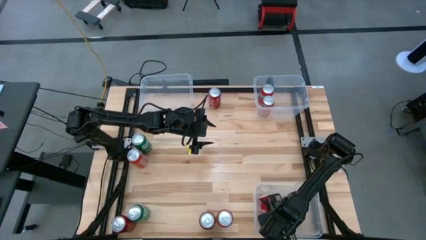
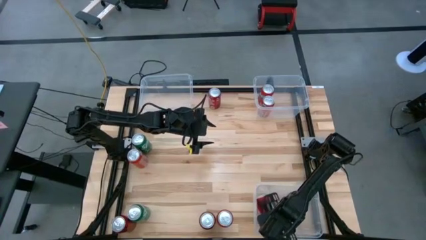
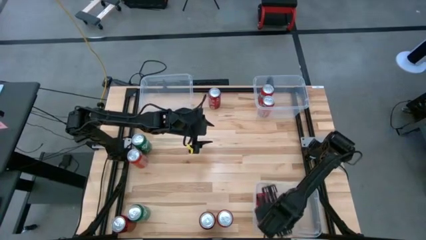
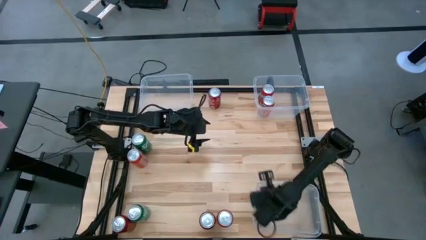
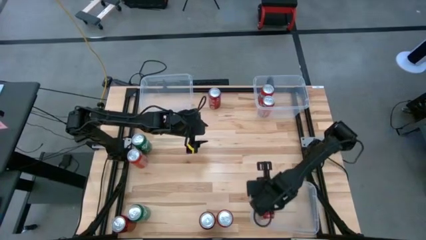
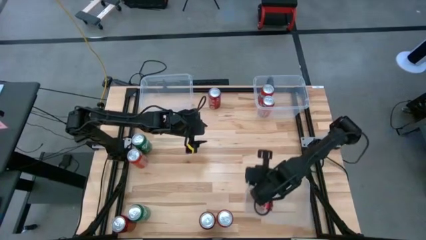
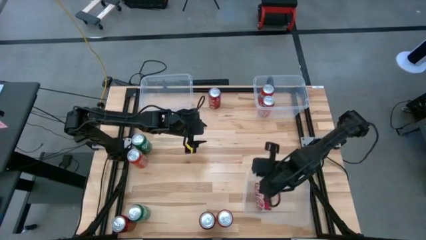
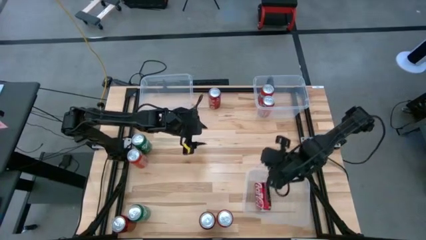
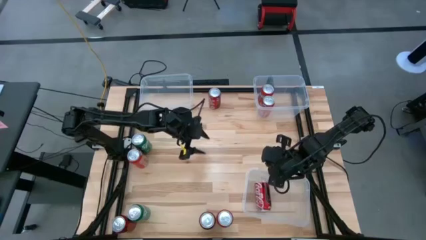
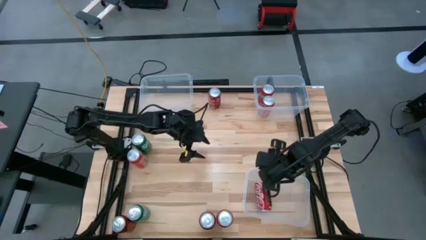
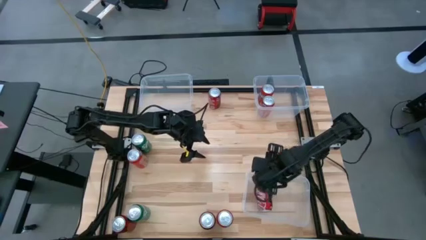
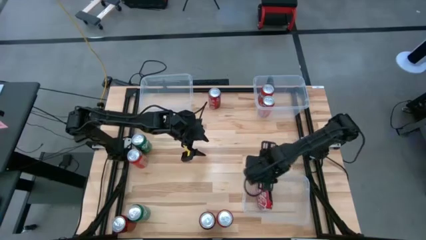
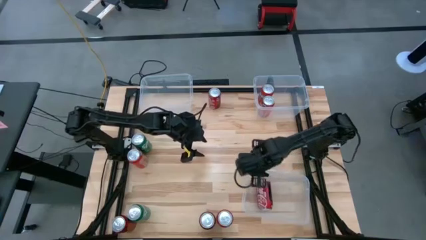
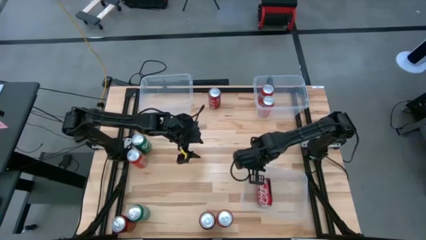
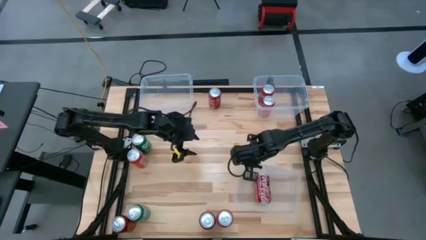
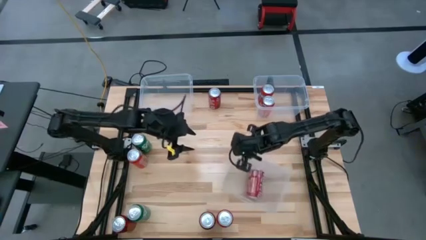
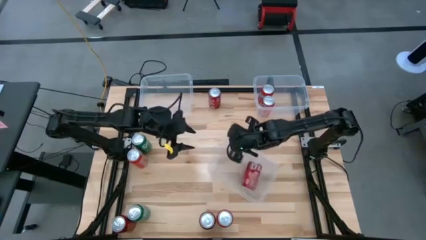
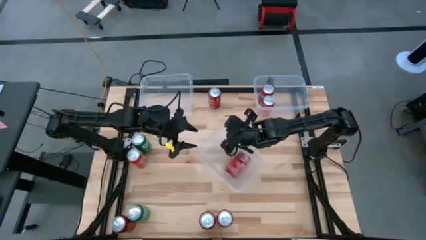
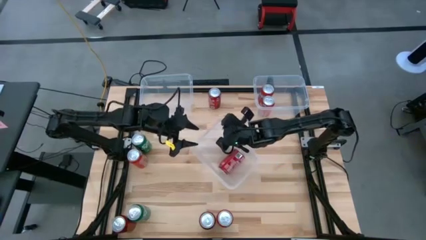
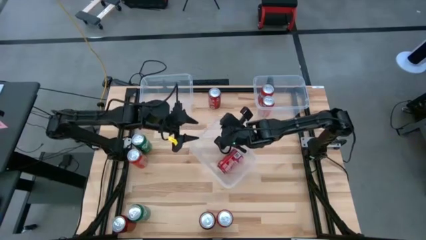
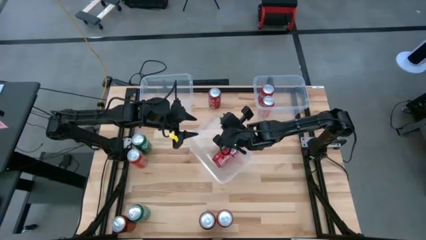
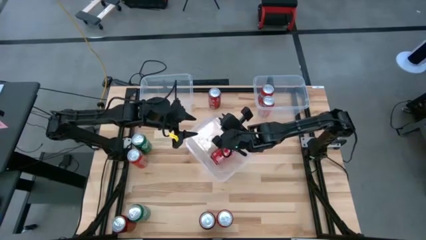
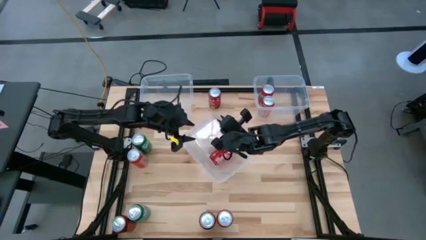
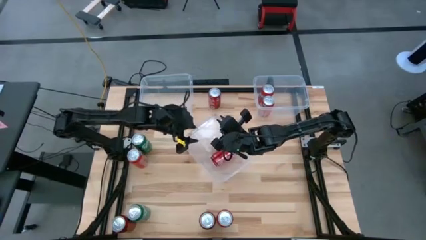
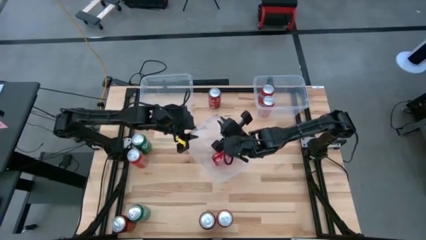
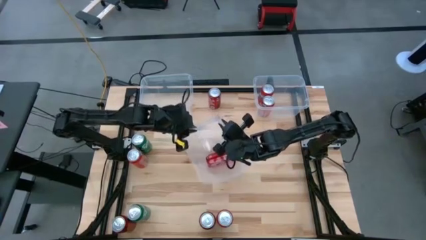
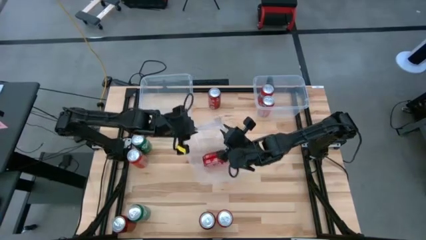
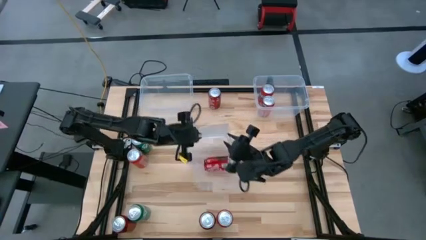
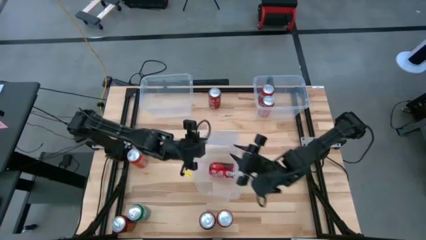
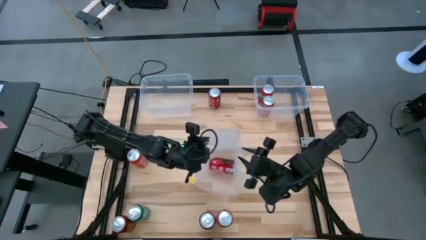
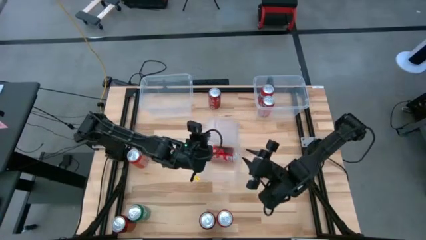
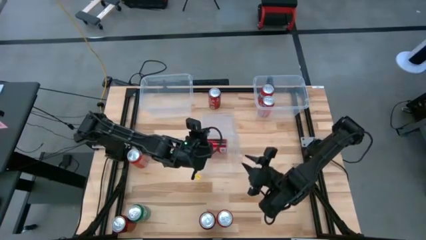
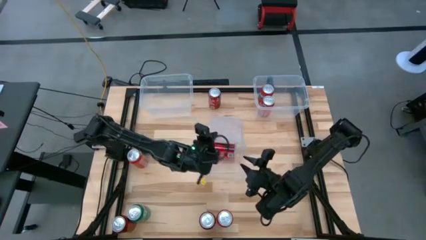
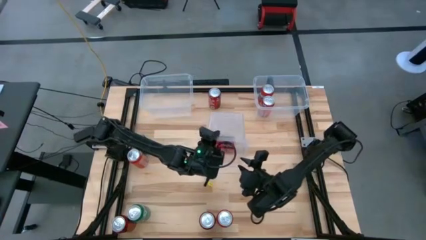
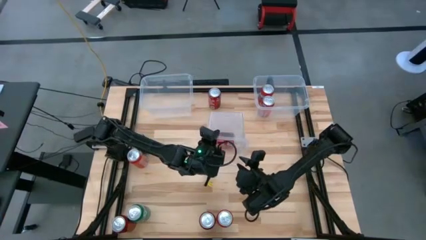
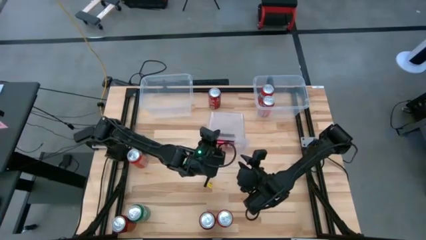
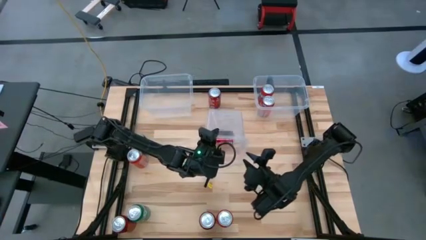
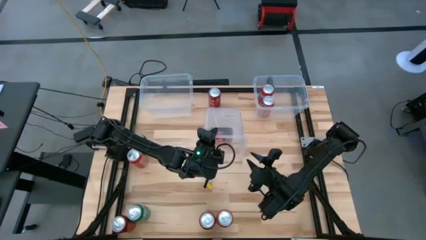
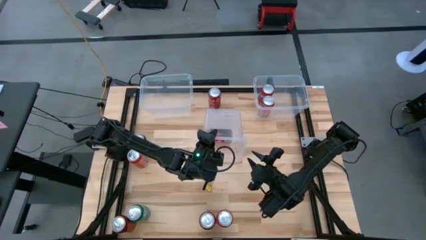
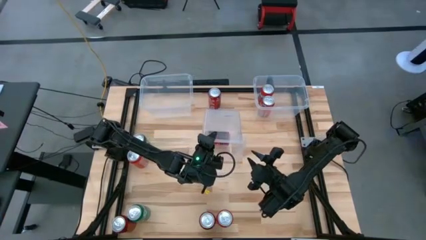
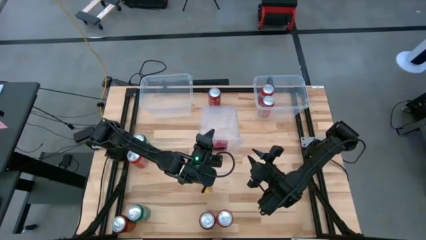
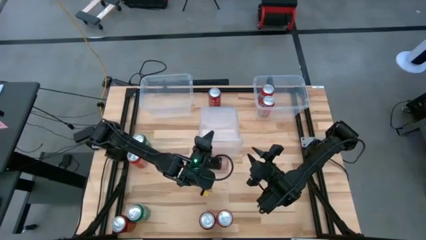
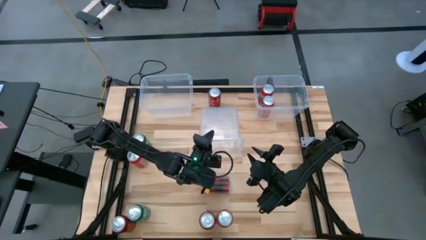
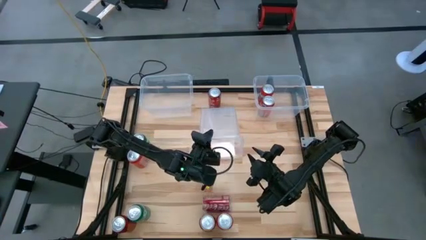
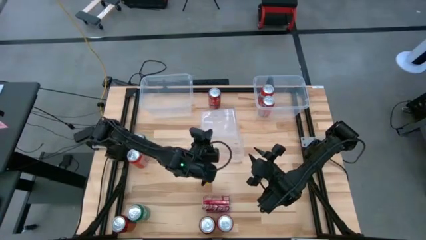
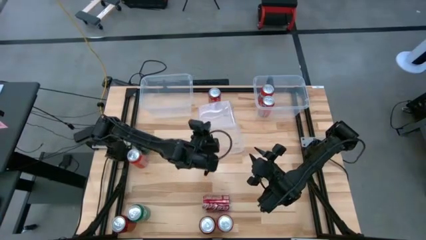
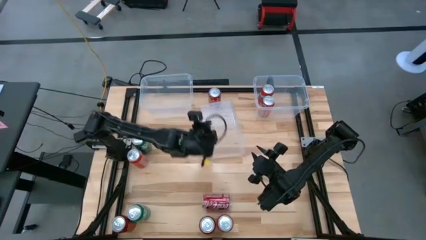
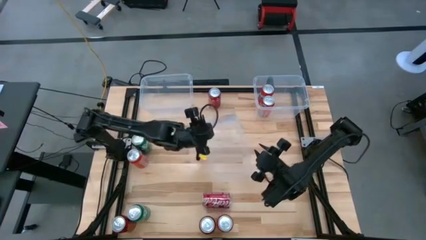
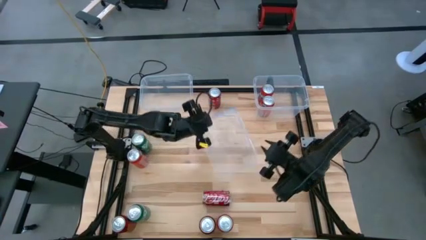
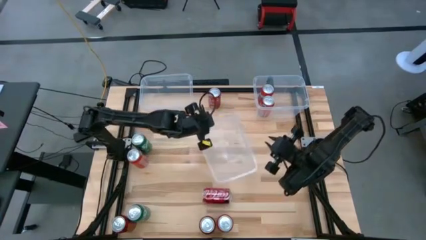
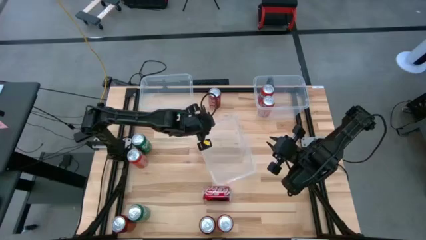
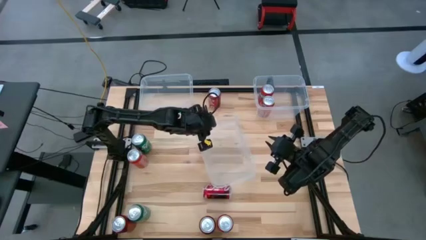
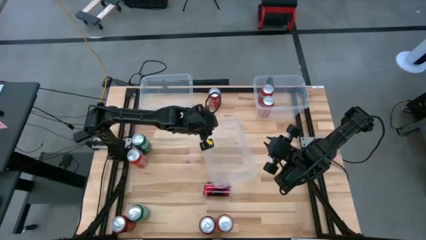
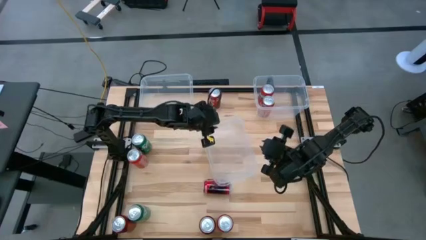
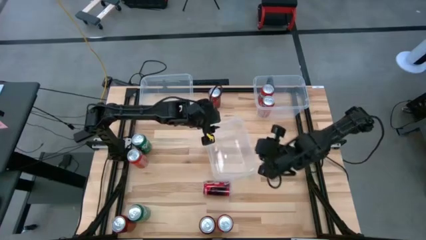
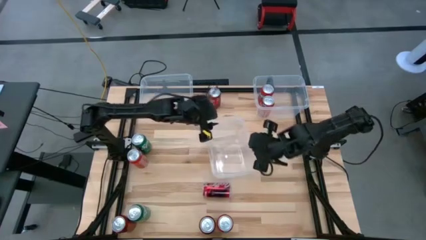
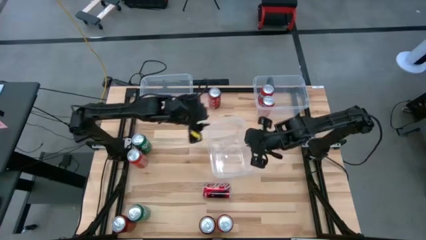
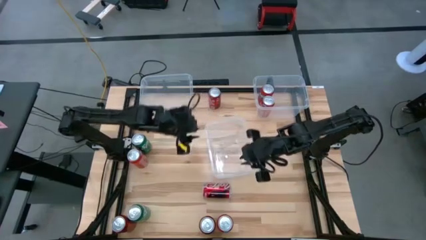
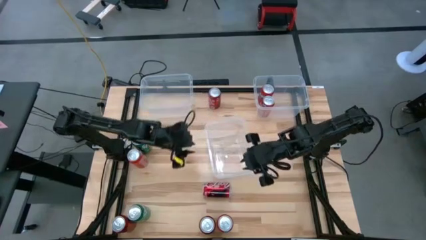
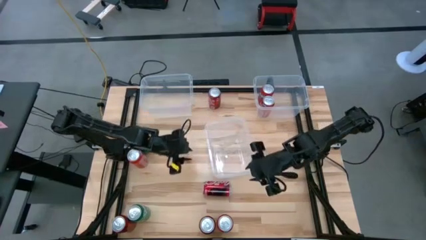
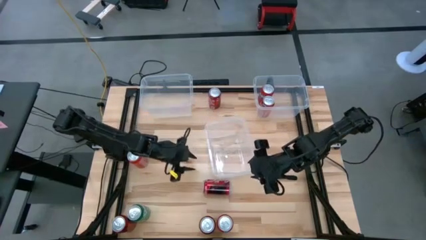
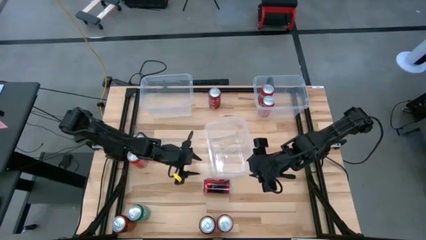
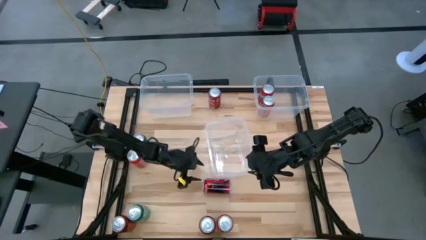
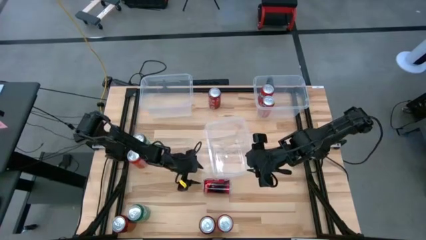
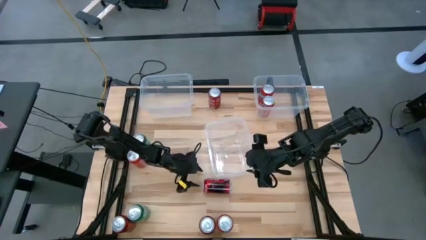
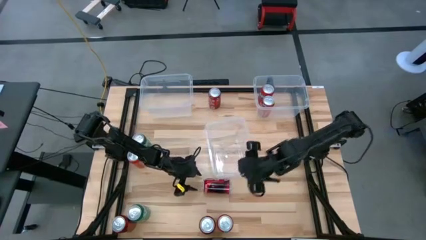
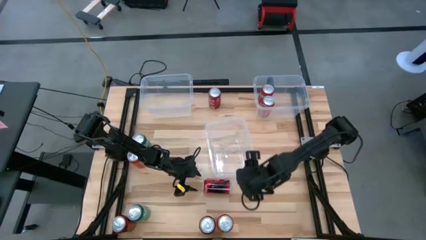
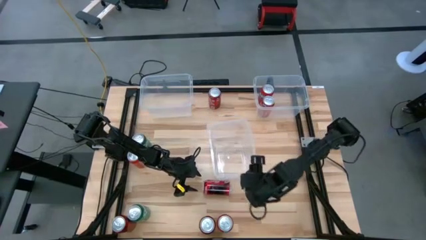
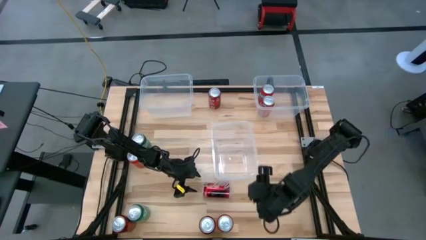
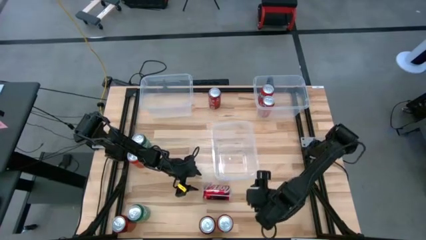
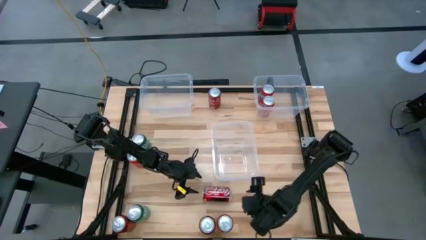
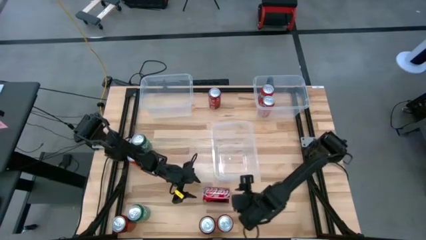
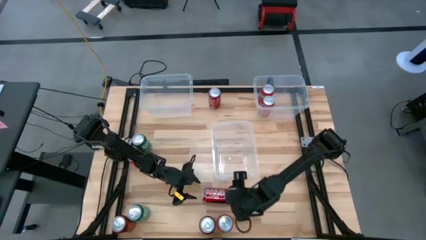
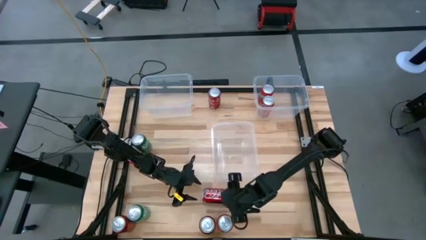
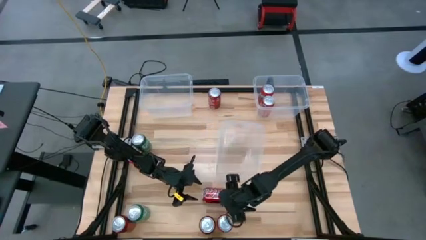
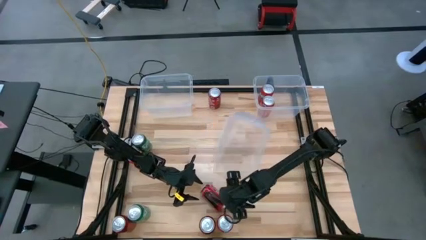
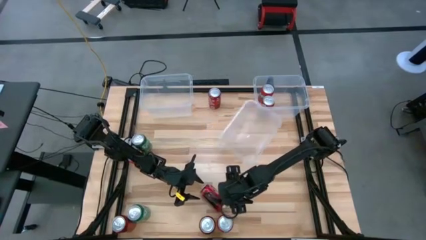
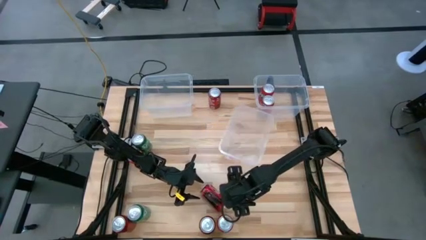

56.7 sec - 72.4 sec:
Task: Sort soda cans
Put the middle right red-white soda can into the bottom transparent bin
